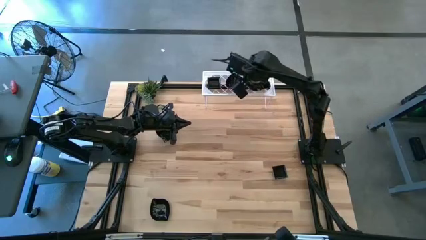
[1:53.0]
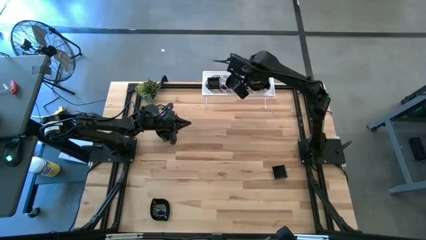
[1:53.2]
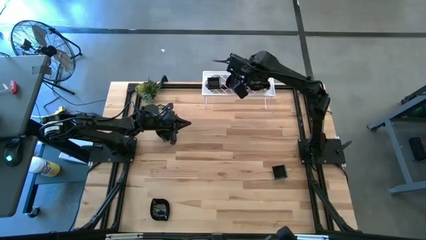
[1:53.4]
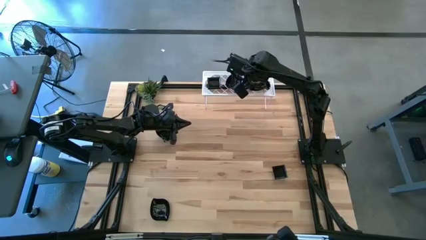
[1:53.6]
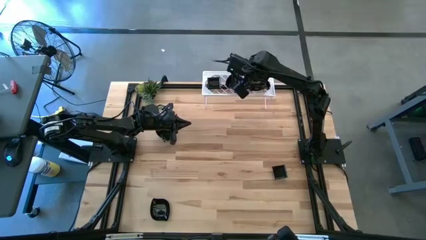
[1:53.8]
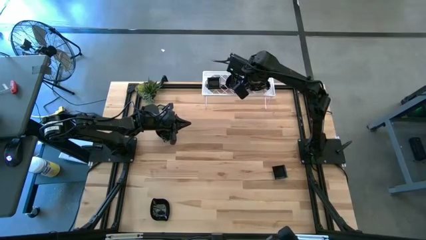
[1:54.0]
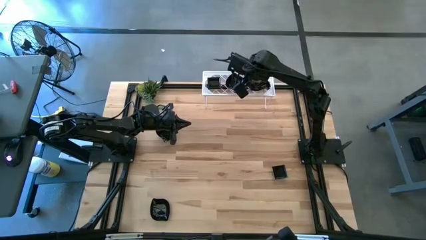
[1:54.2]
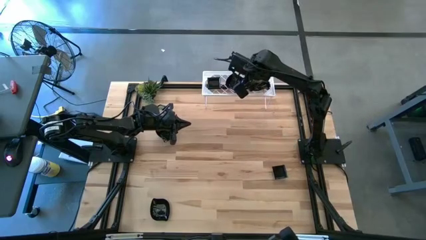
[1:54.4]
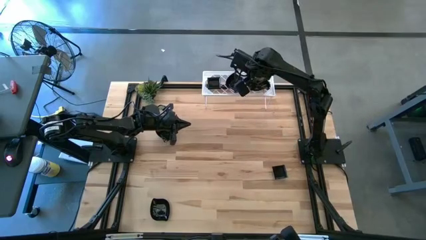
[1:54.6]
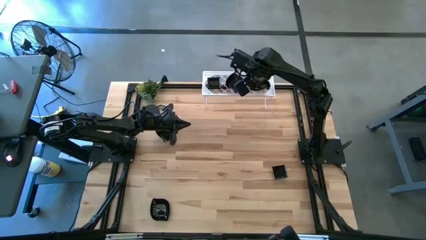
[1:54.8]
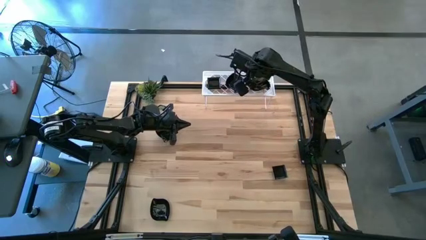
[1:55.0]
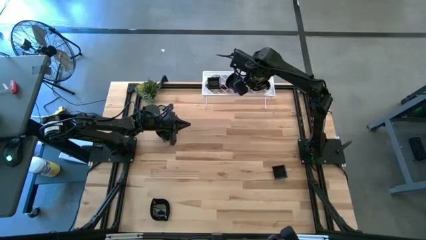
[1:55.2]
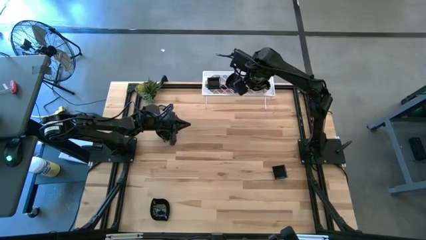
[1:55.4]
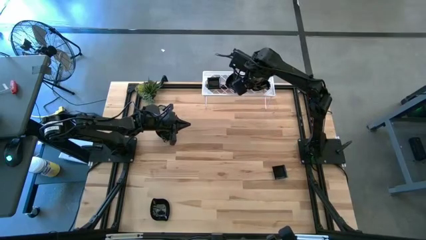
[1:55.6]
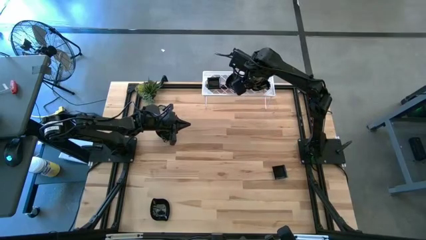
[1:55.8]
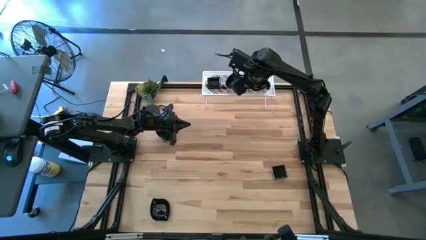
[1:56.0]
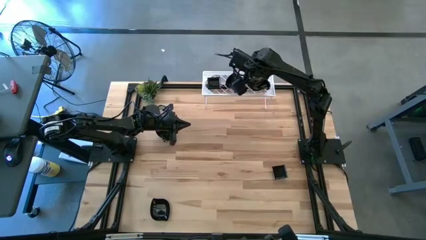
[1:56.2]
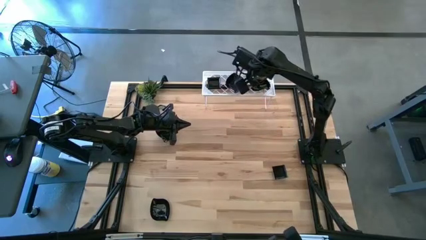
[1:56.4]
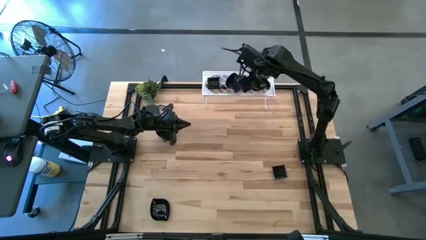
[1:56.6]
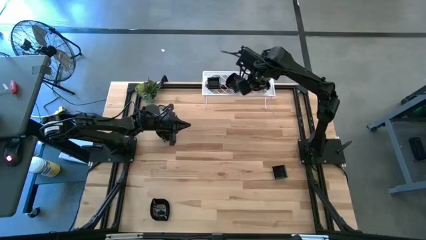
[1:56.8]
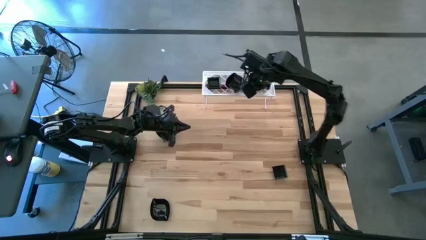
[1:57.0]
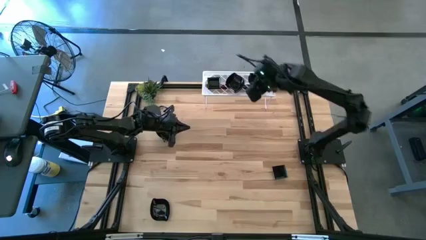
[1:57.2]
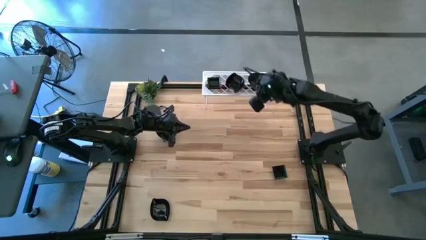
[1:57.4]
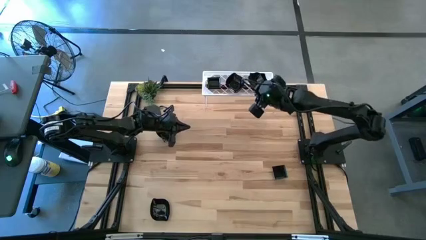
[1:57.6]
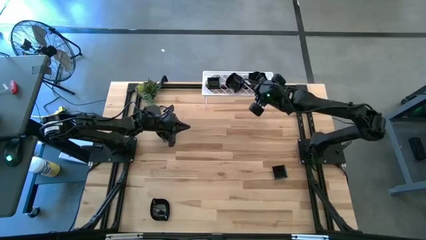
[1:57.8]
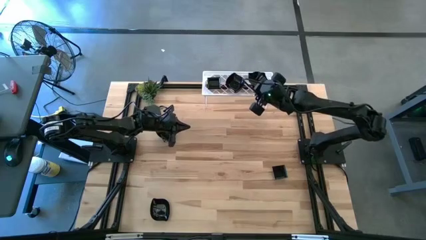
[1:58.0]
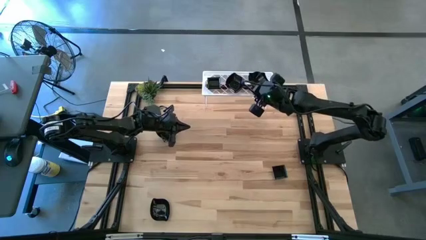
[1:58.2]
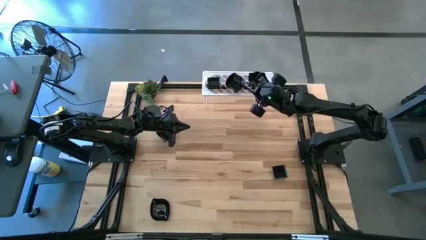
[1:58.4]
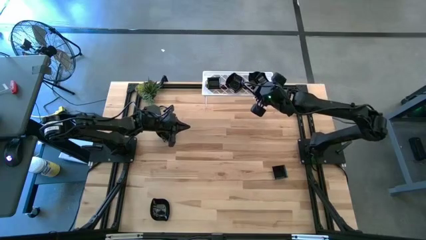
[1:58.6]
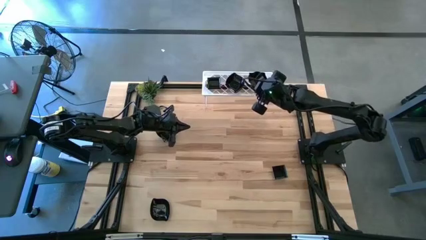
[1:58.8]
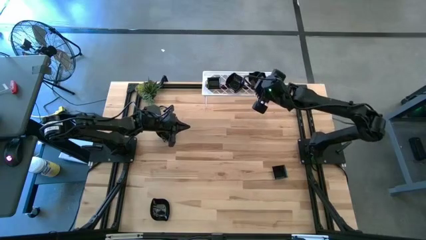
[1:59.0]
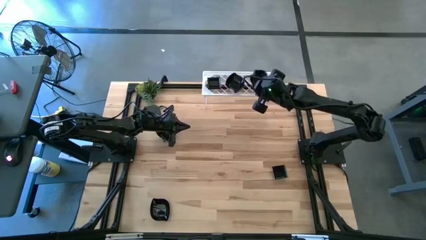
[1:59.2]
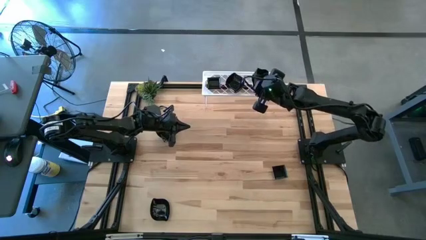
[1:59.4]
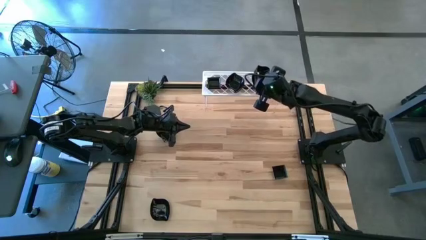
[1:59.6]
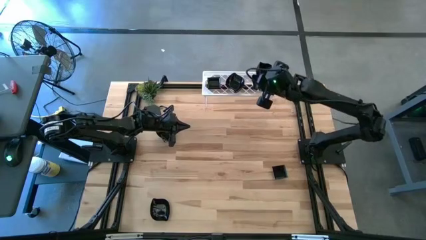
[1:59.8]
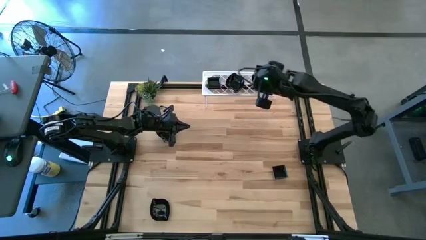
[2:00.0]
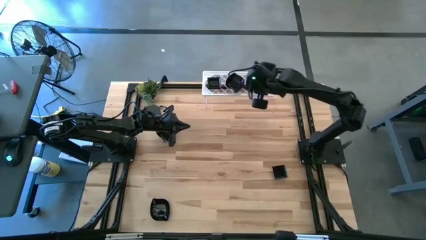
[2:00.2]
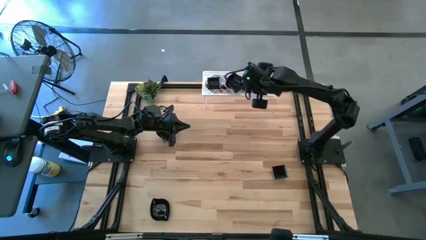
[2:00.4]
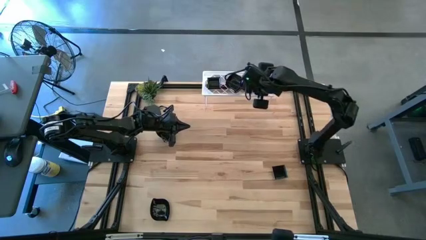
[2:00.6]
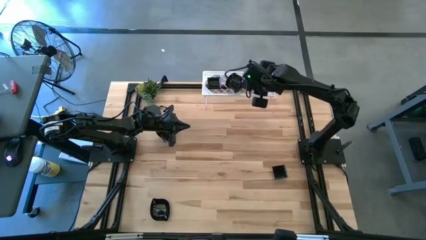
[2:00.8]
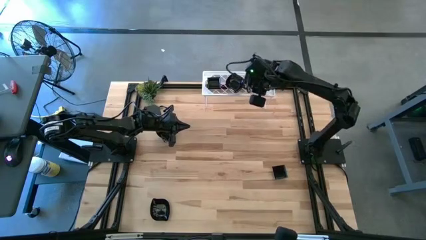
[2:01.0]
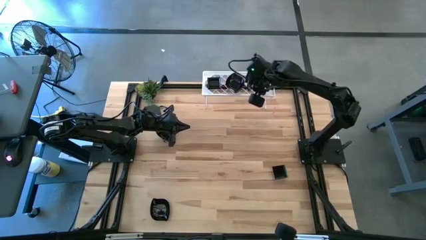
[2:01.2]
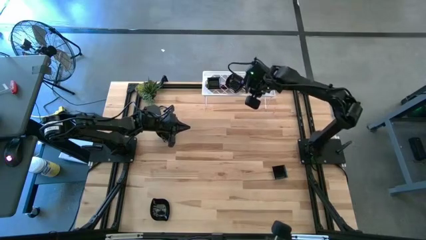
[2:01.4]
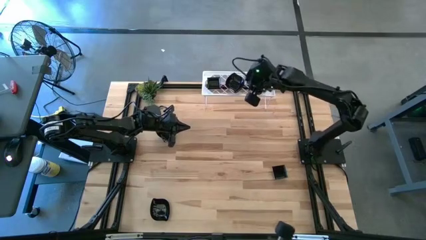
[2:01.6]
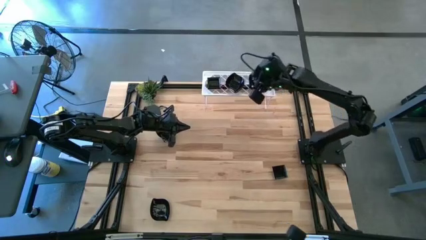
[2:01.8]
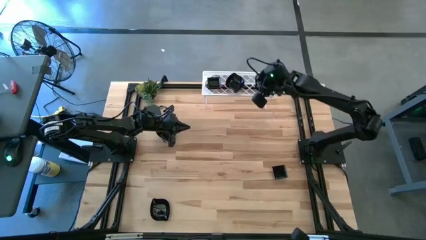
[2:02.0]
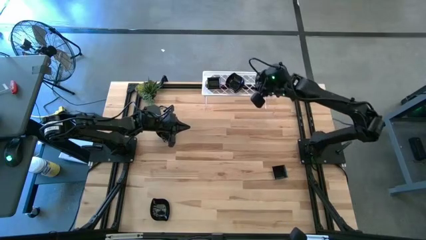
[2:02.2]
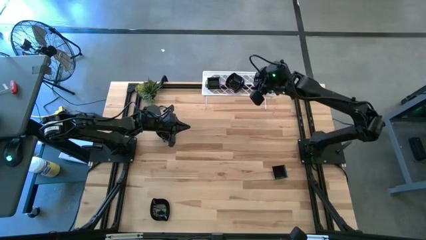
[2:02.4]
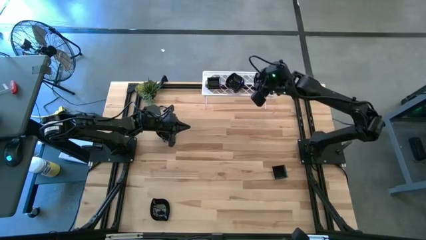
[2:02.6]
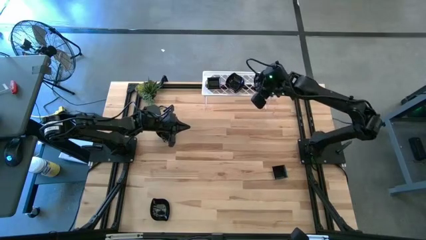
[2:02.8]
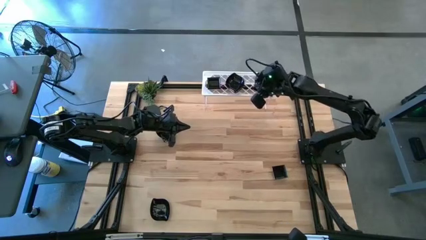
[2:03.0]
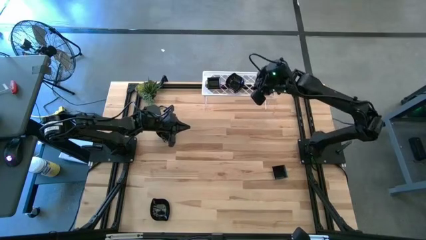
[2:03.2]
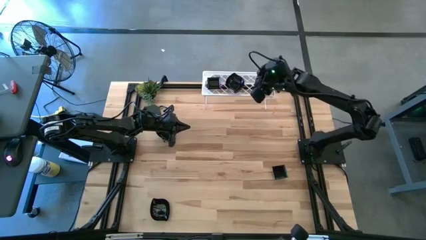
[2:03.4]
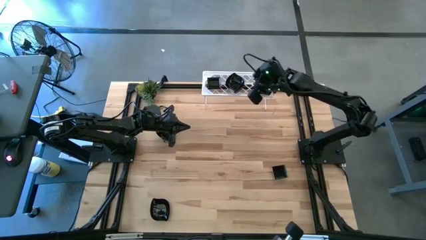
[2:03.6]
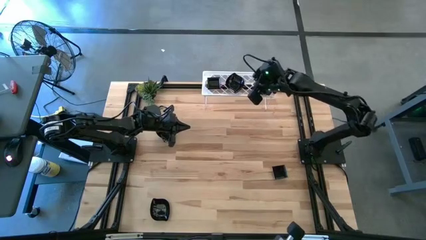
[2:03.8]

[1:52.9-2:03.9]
Task: Pick & Place Mini shaped plates
Stack the distorted square plate on top of the stacked distorted square plates on the shelf

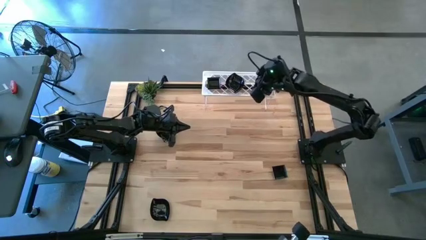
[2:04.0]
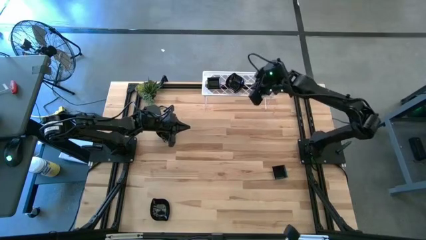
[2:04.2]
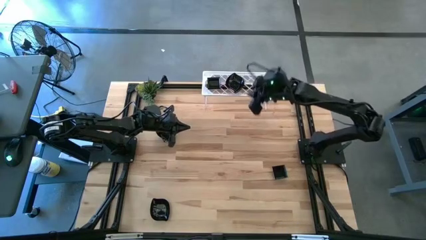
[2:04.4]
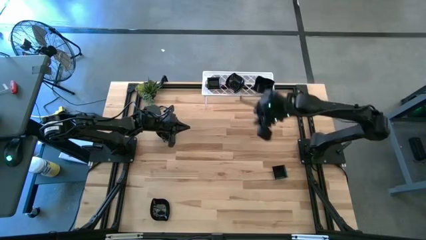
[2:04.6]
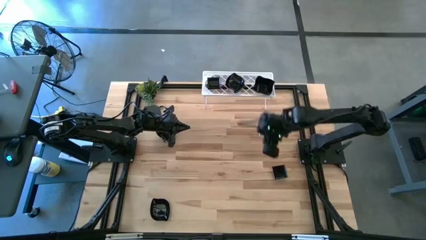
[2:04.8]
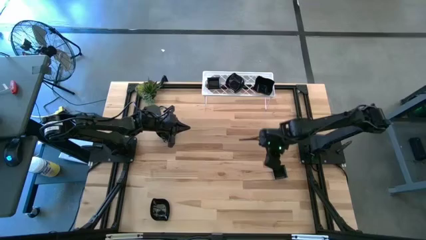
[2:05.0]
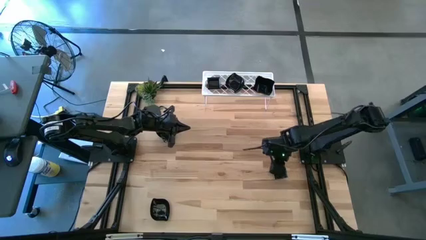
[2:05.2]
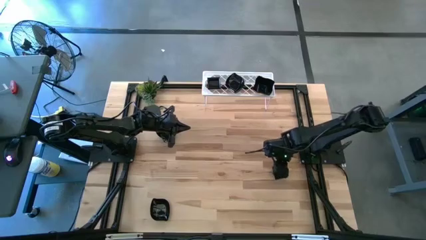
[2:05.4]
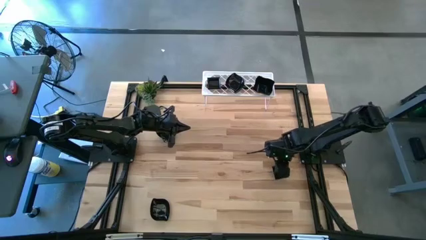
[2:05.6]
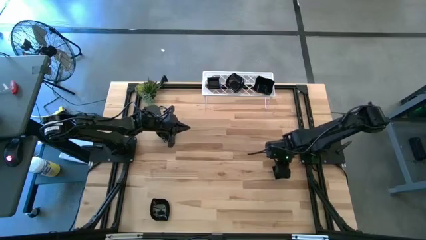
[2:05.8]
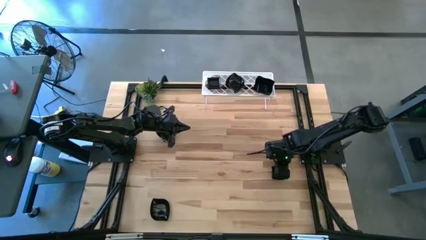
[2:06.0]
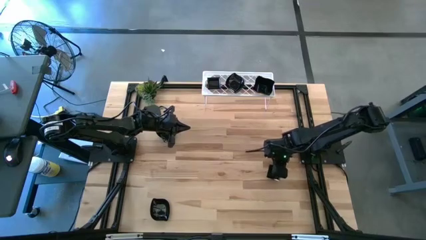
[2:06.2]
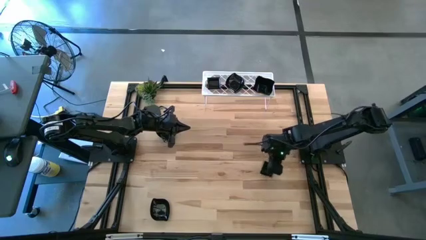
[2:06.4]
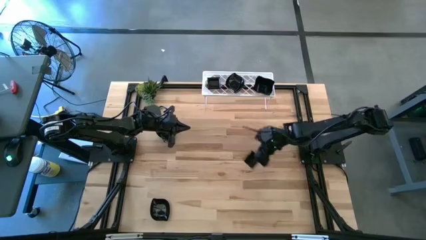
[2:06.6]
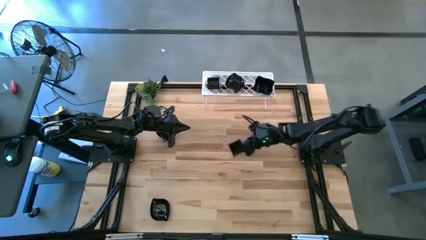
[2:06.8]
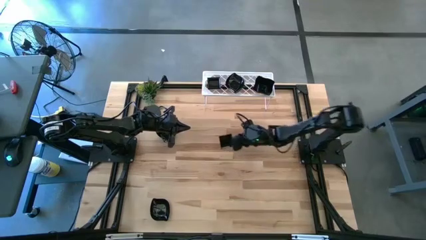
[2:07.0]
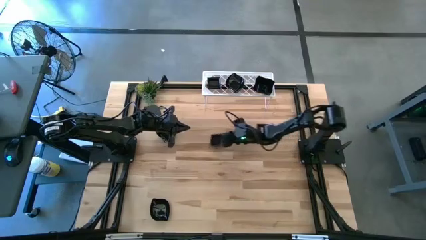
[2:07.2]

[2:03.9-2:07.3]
Stack the square plate on top of the stacked square plates on the shelf
